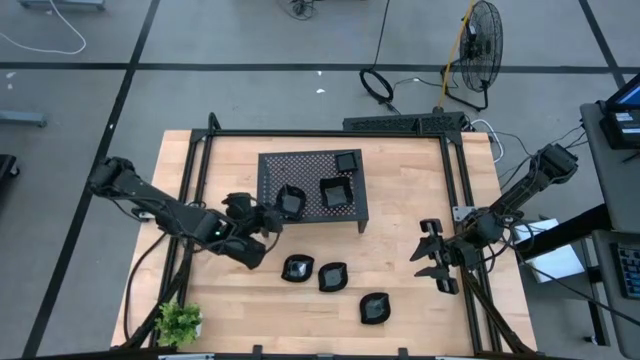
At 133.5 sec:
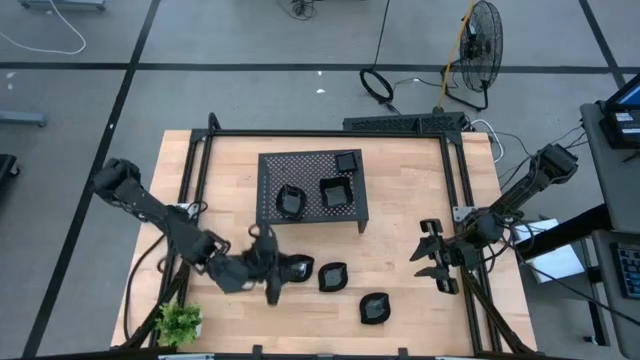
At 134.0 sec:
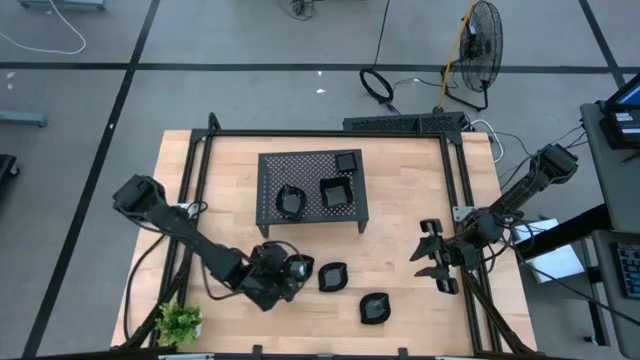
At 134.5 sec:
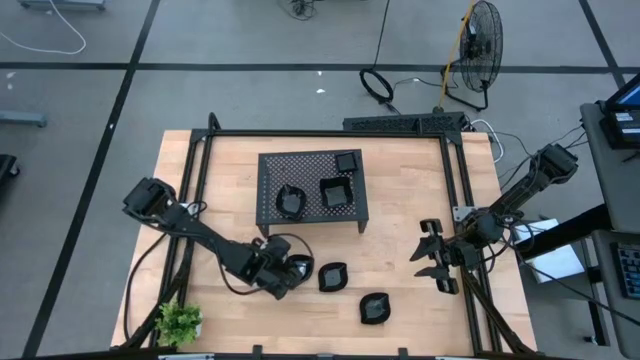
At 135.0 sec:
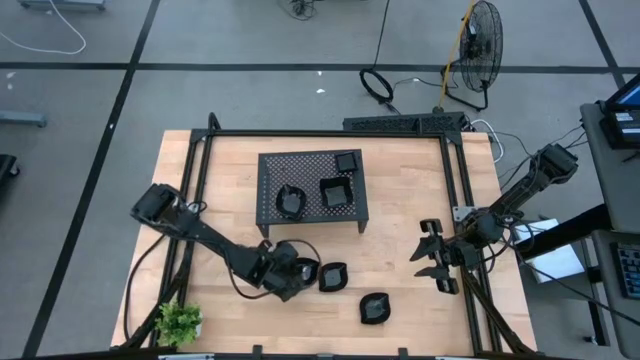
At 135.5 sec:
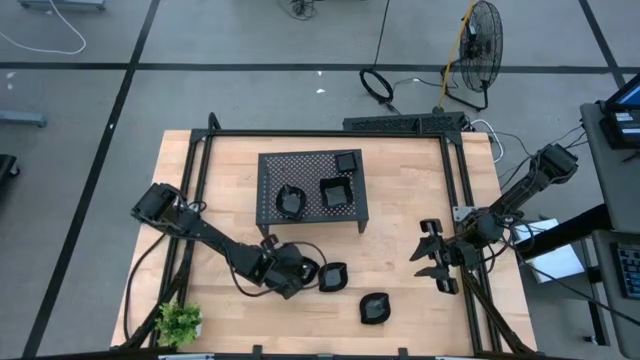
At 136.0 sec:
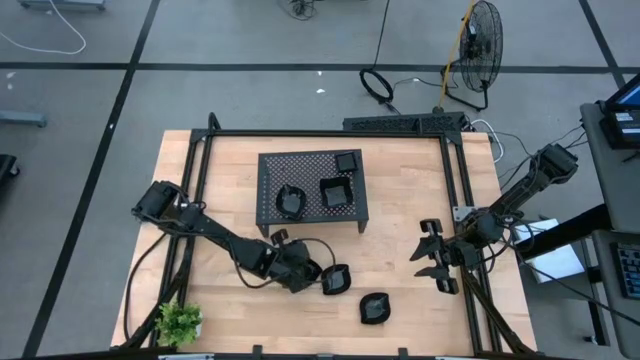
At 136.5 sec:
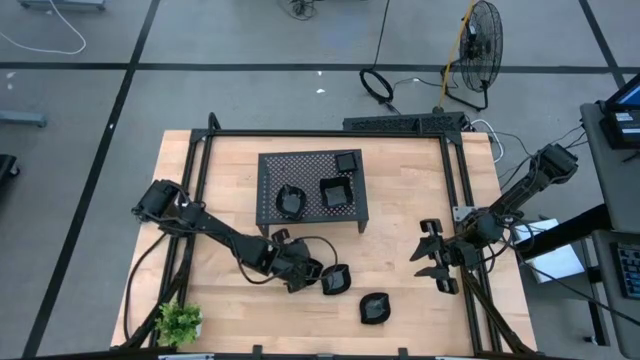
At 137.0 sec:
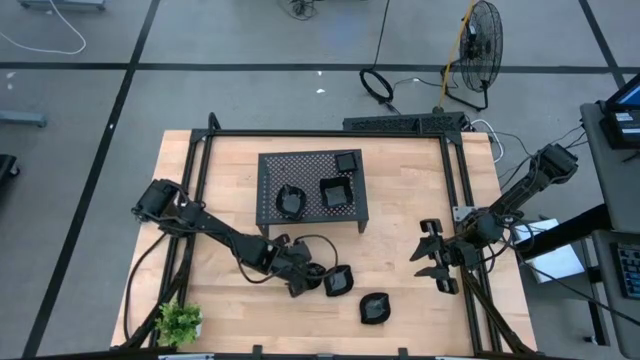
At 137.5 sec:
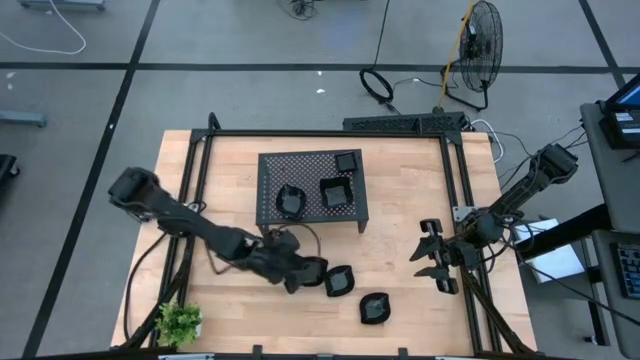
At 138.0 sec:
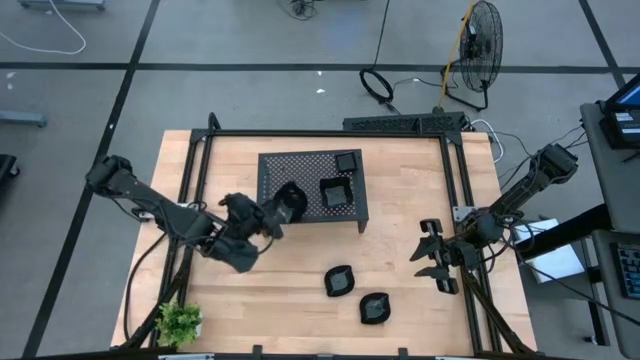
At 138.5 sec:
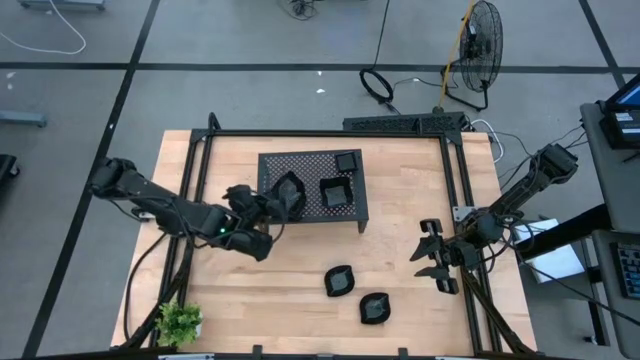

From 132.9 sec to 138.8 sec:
Task: Pick & Place Mini shaped plates
Stack the leaf-shaped plate onto the stacked leaf-shaped plate on the shelf

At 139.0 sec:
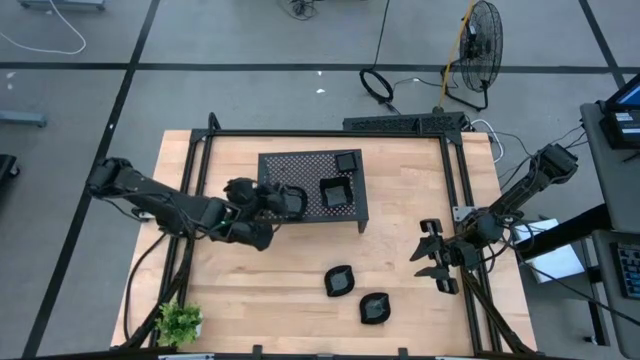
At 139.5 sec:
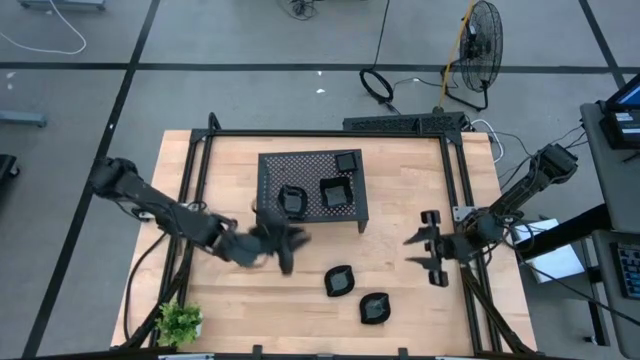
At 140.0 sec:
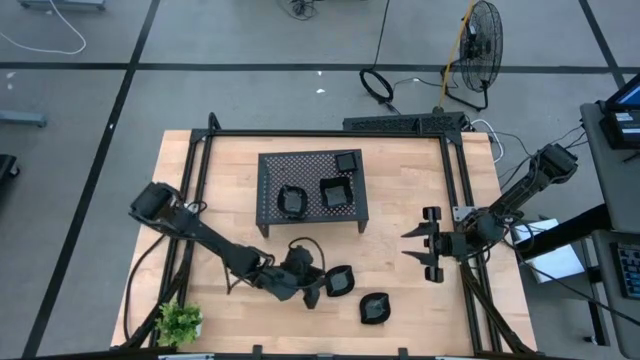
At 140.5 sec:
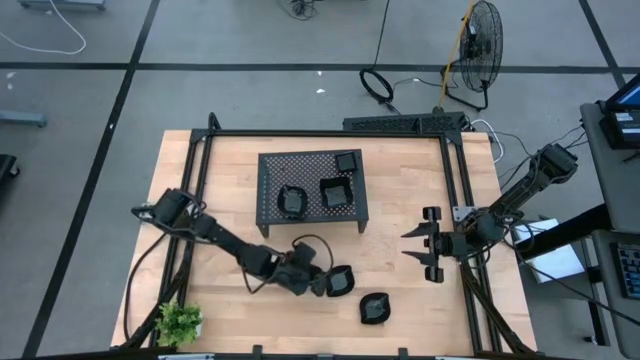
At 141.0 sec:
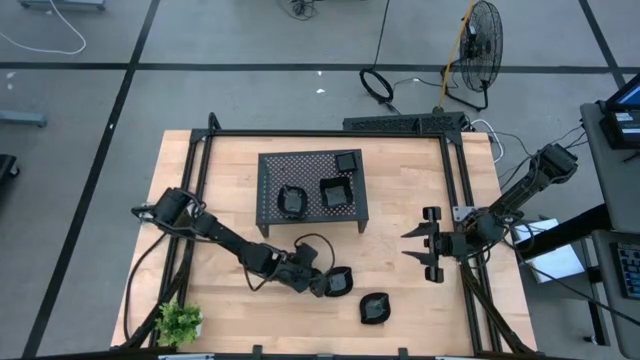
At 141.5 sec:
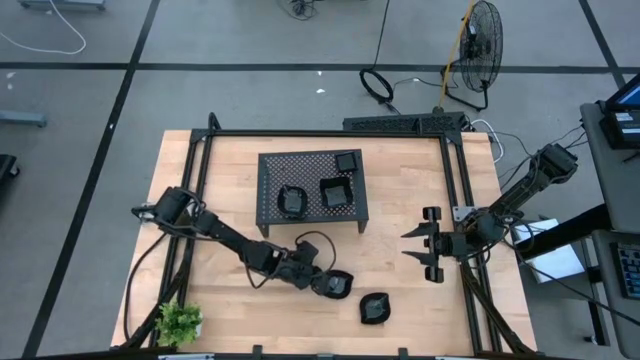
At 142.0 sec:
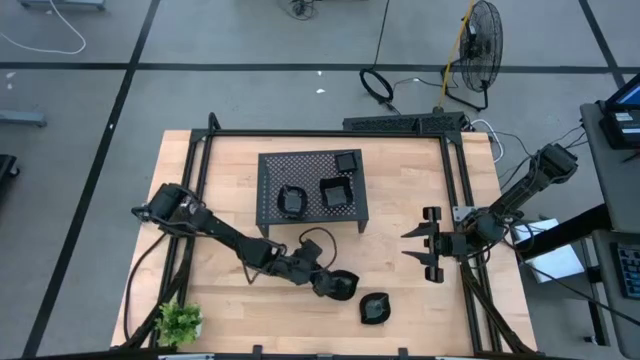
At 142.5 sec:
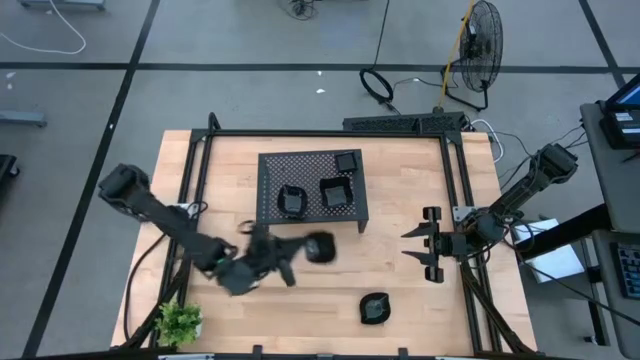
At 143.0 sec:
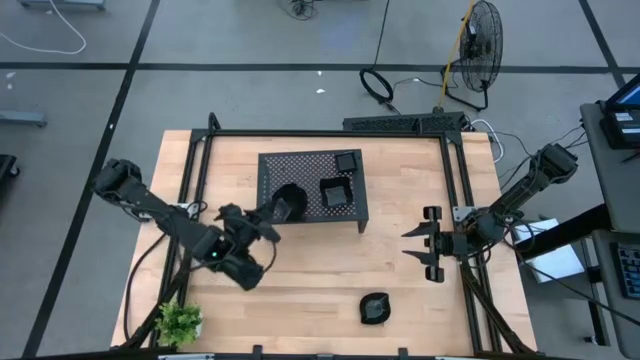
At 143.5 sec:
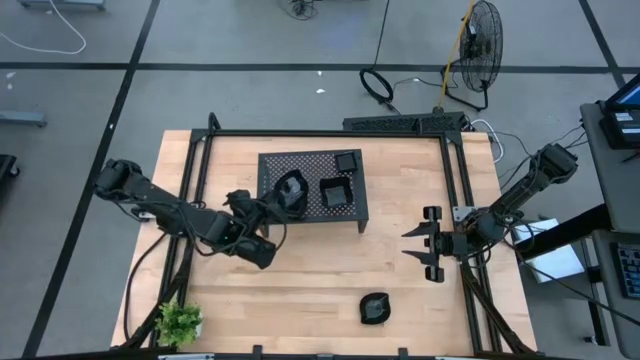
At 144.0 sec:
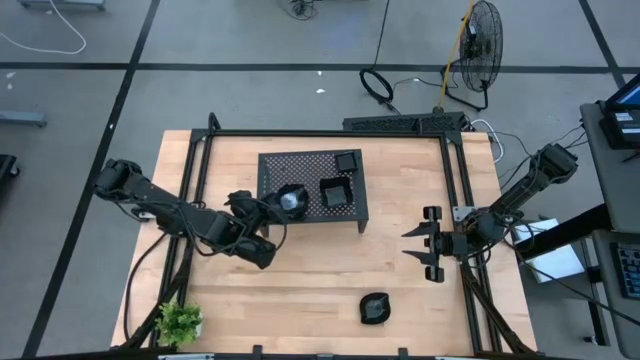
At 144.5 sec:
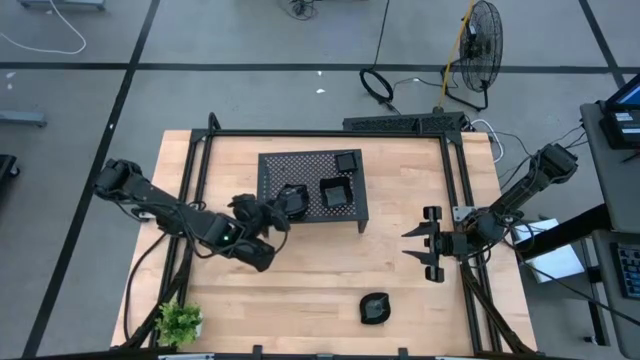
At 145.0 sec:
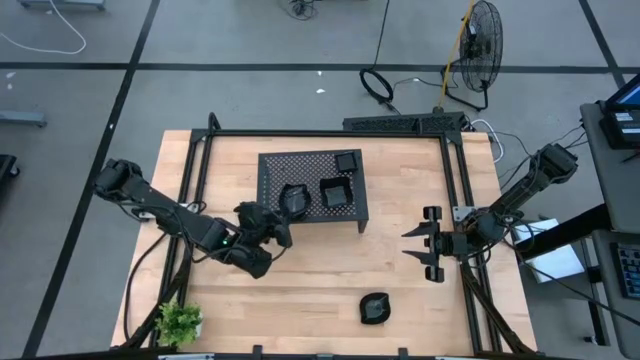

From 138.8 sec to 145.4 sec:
Stack the leaf-shaped plate onto the stacked leaf-shaped plate on the shelf

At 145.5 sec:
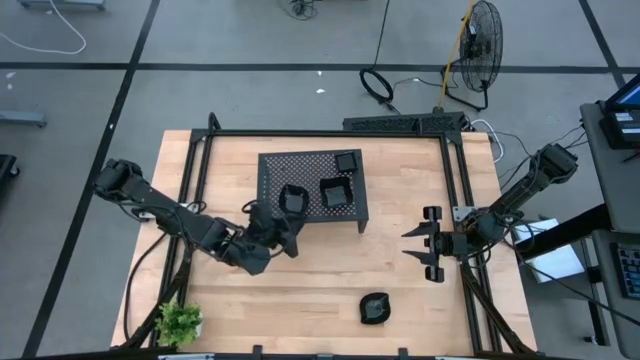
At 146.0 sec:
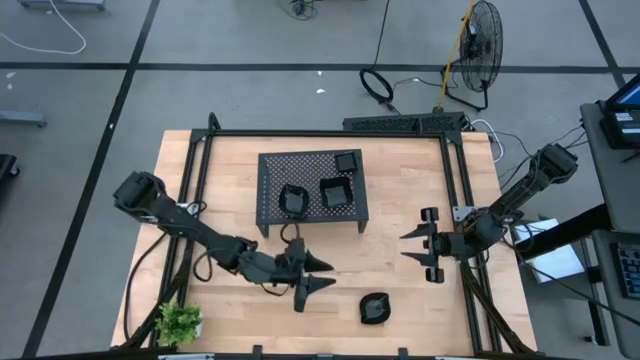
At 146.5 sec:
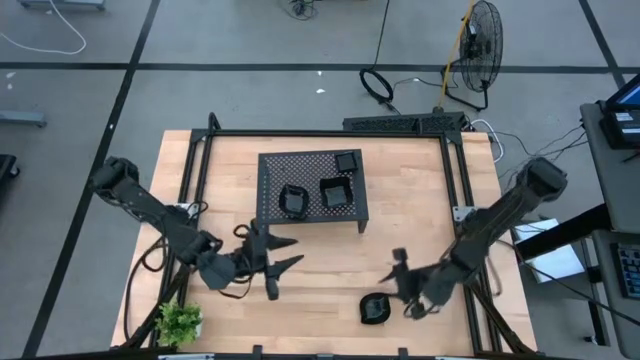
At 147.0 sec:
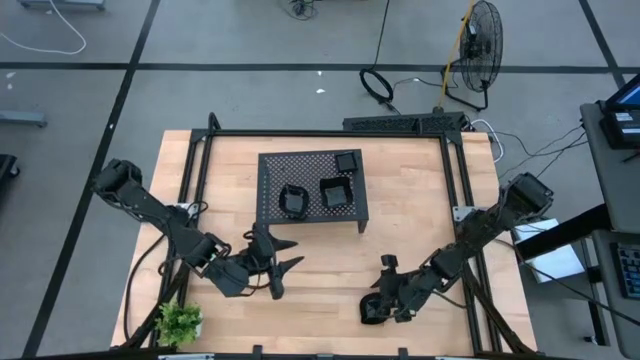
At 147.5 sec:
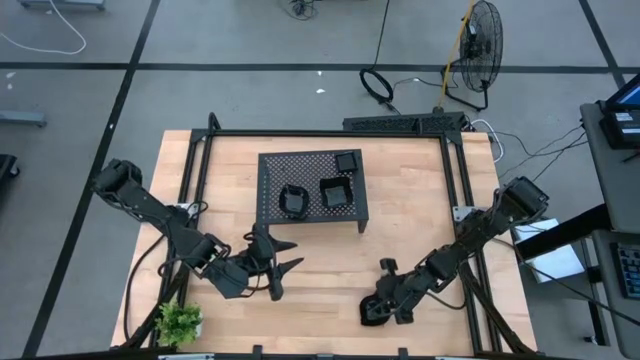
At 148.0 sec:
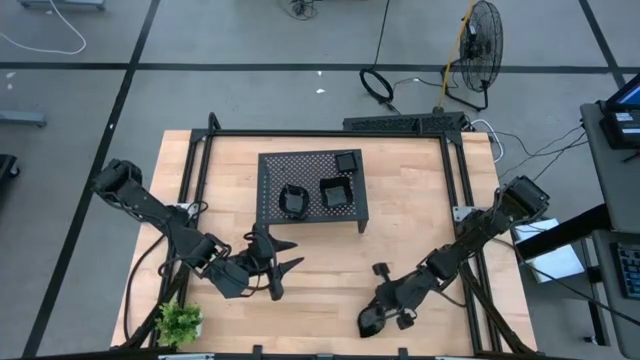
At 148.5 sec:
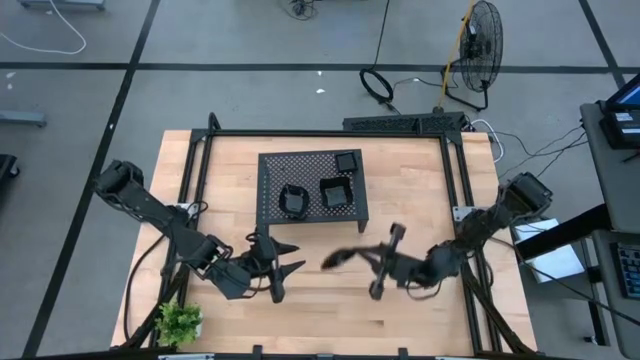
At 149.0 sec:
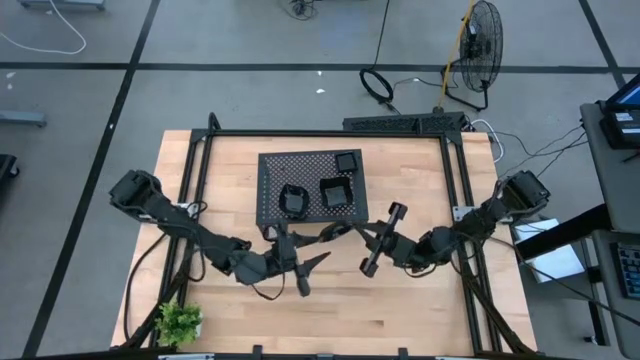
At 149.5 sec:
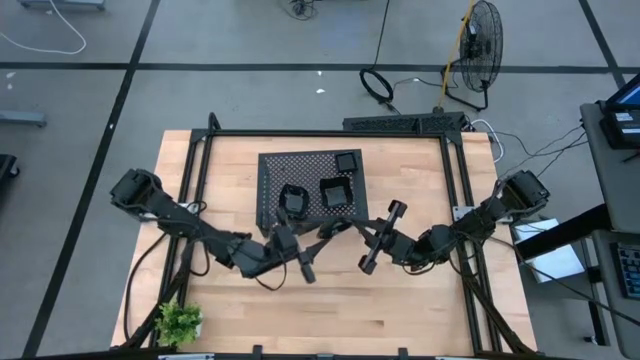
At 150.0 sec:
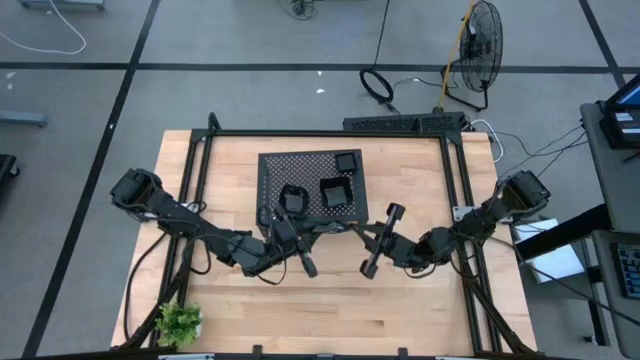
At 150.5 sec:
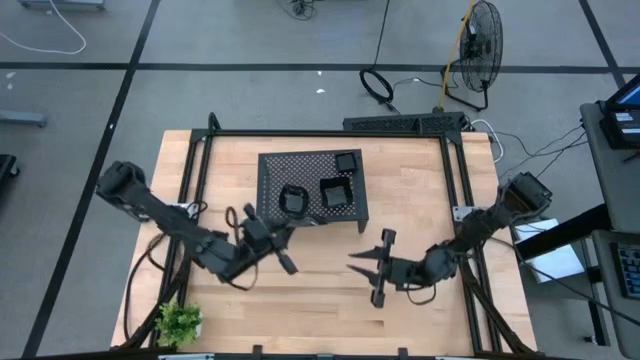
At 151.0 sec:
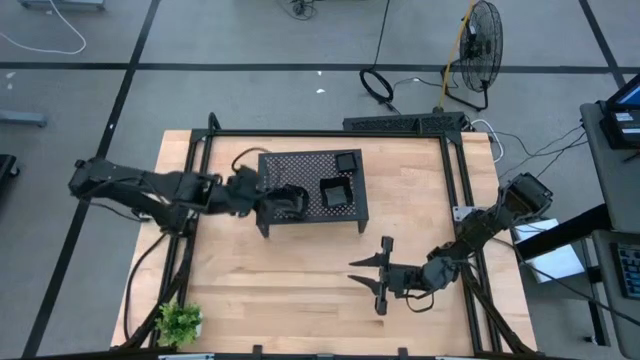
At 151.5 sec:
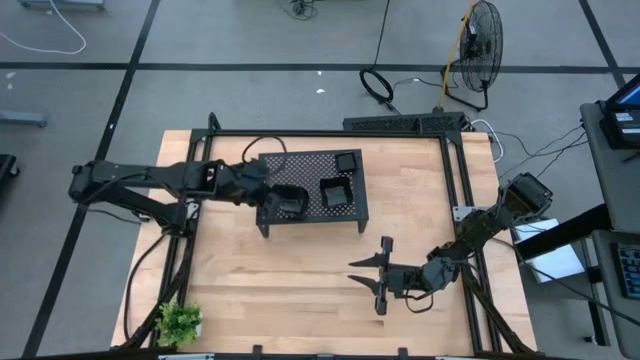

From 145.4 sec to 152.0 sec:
Stack the leaf-shaped plate onto the stacked leaf-shaped plate on the shelf

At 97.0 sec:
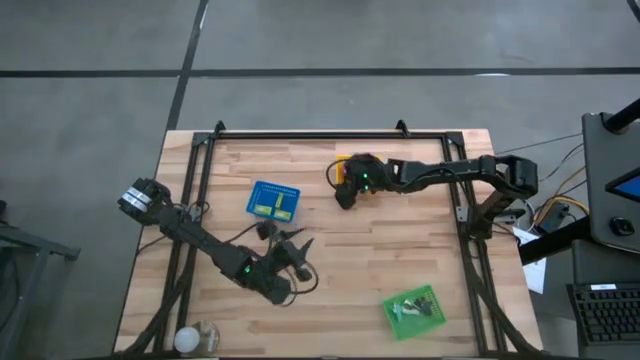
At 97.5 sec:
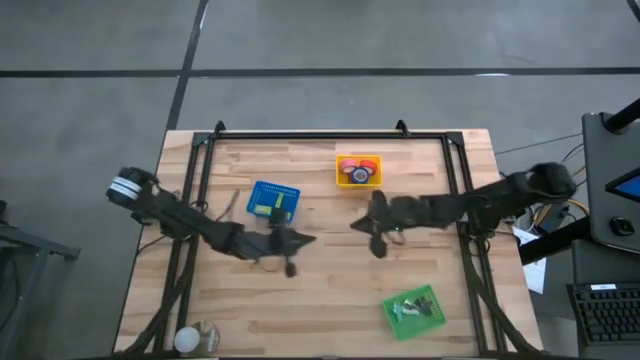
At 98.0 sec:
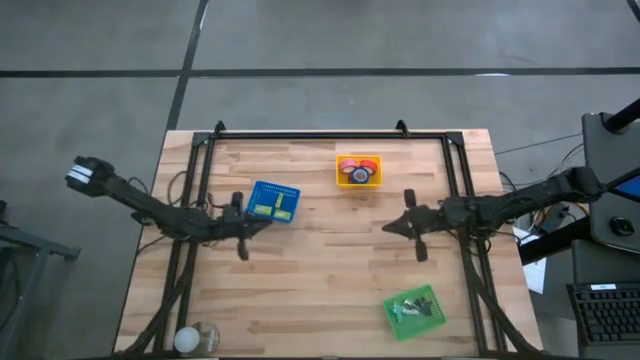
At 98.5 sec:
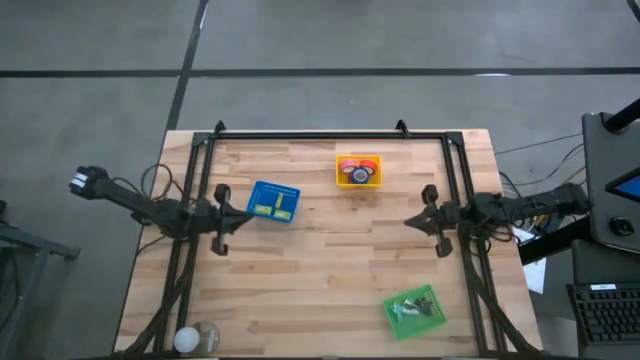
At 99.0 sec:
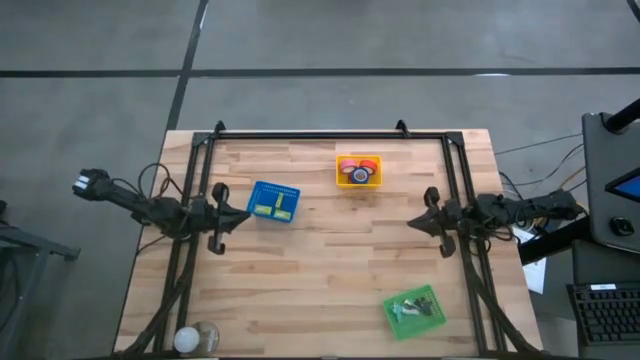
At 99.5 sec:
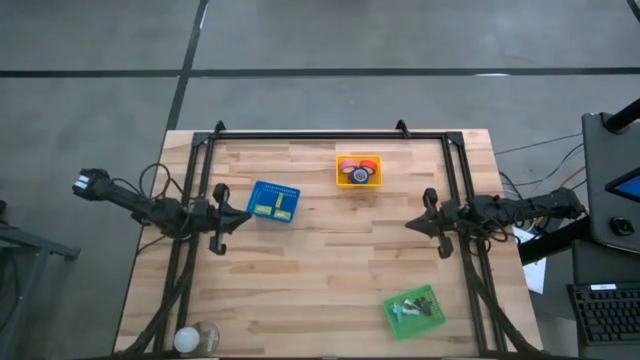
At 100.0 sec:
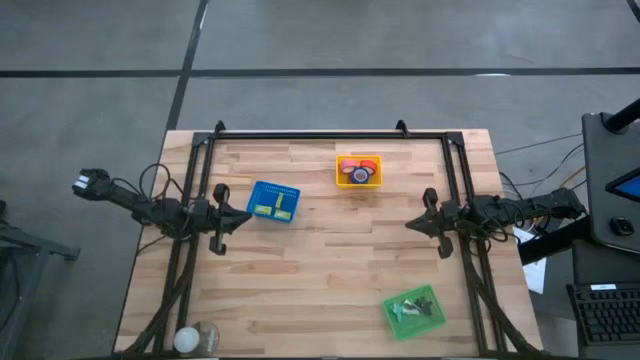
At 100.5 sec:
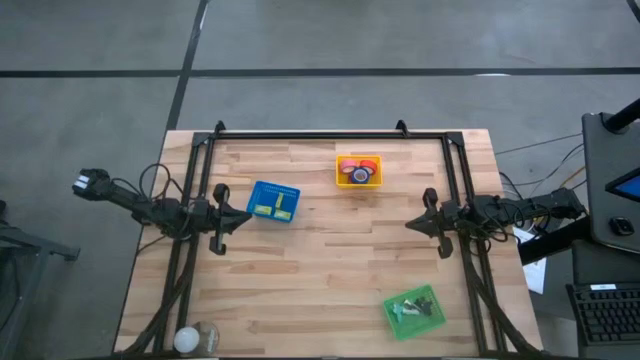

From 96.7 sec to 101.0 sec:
Task: Pick and place Stapler, Stapler remover, tape
Return to Home Position
